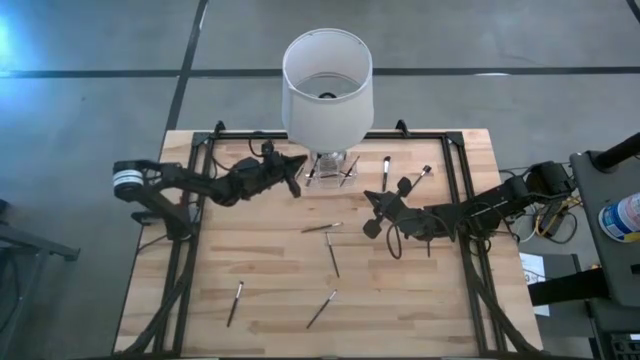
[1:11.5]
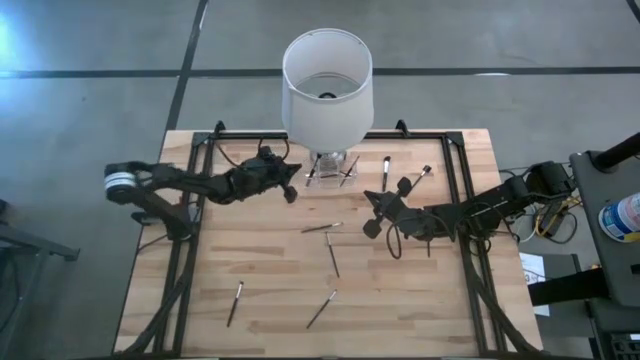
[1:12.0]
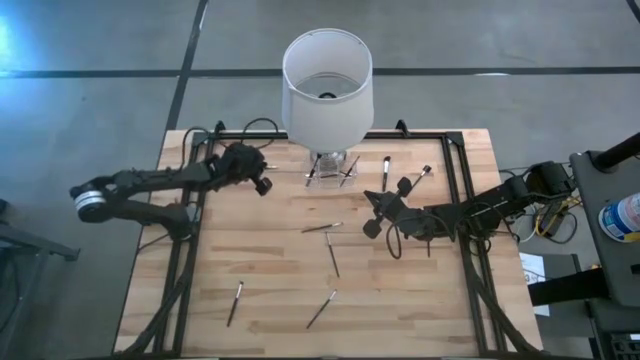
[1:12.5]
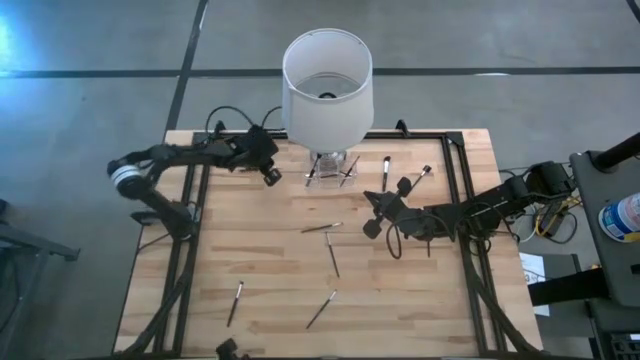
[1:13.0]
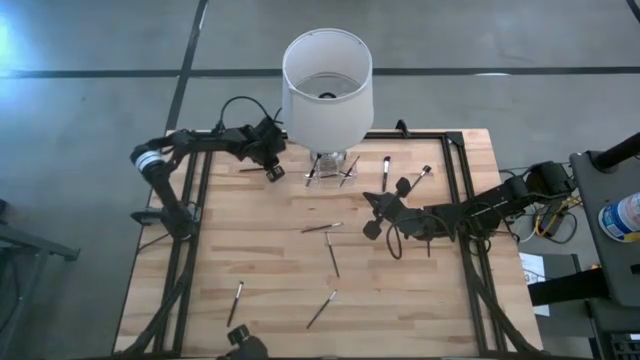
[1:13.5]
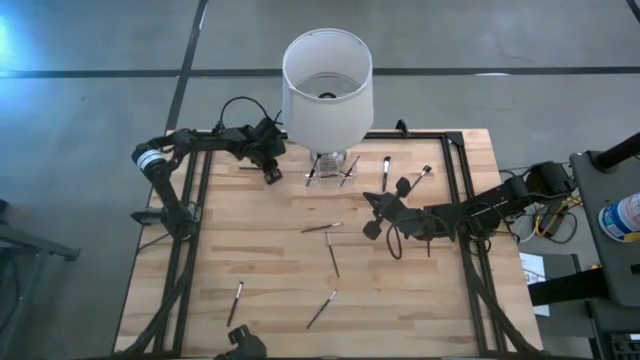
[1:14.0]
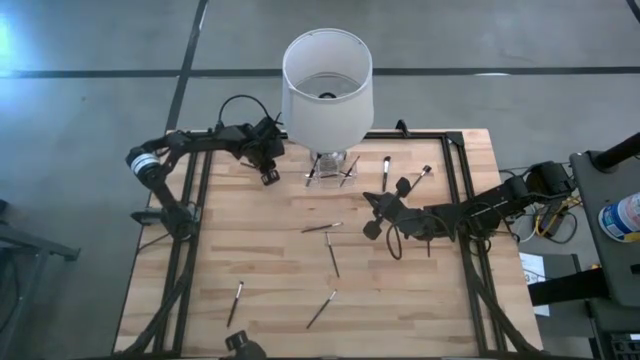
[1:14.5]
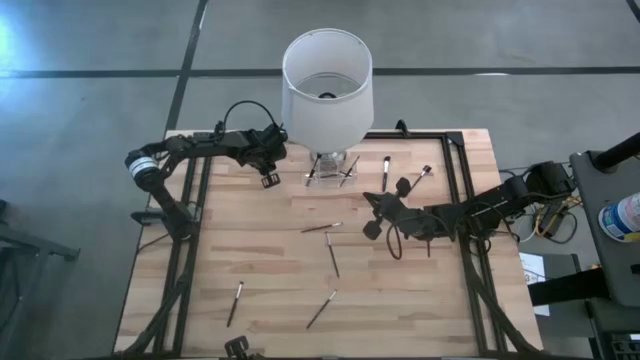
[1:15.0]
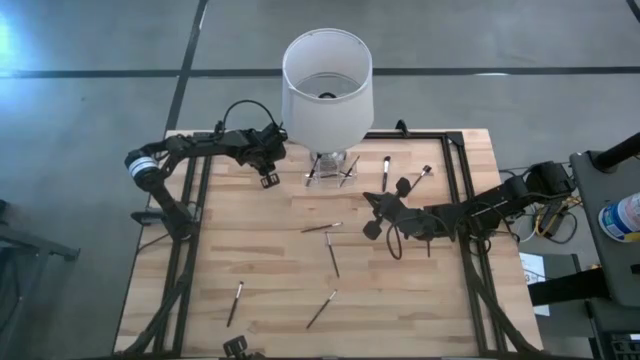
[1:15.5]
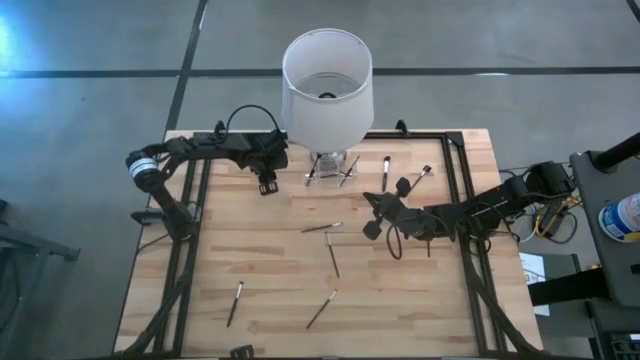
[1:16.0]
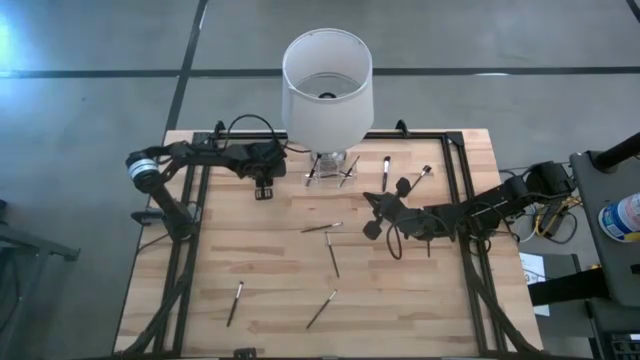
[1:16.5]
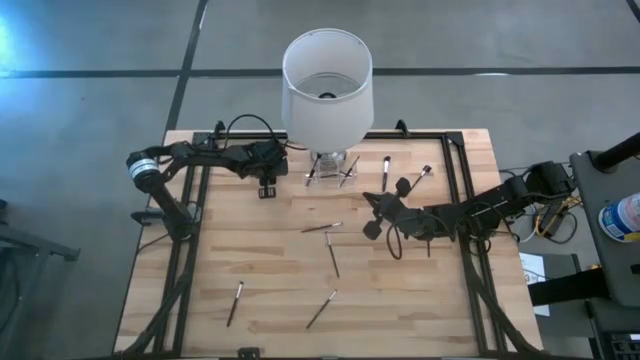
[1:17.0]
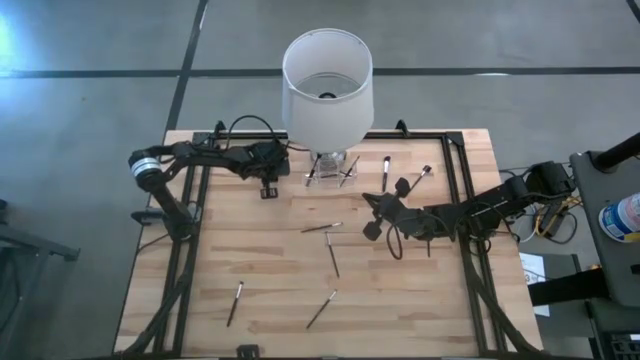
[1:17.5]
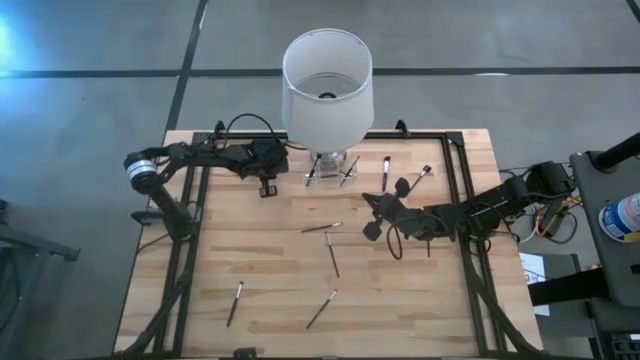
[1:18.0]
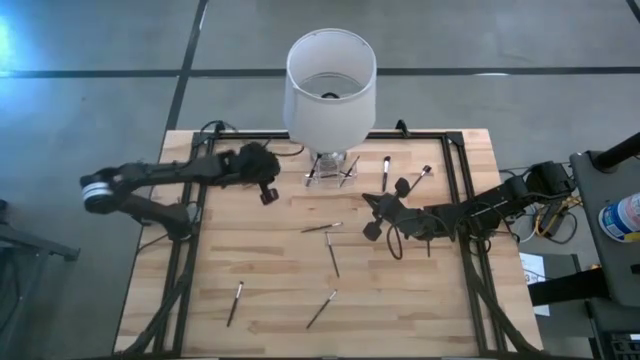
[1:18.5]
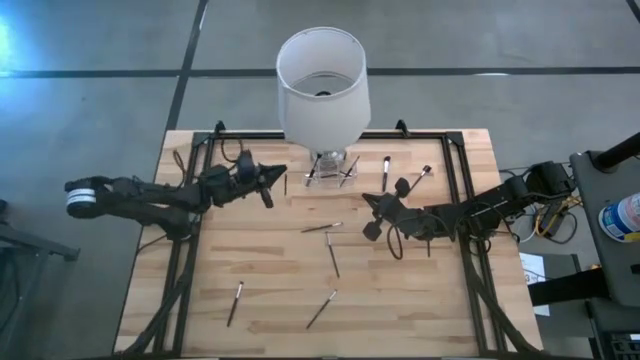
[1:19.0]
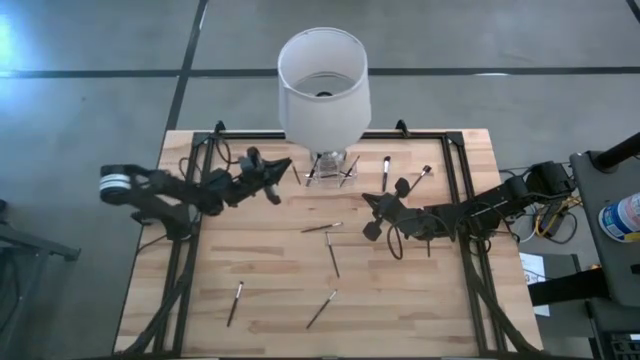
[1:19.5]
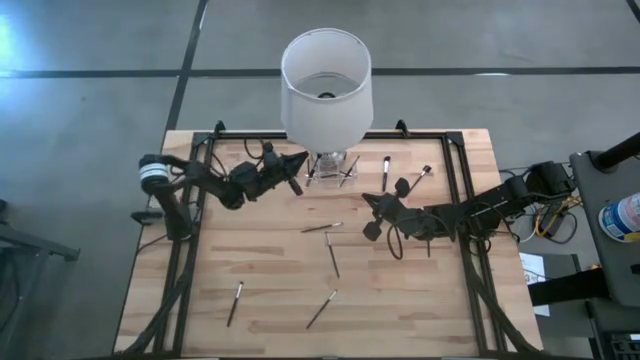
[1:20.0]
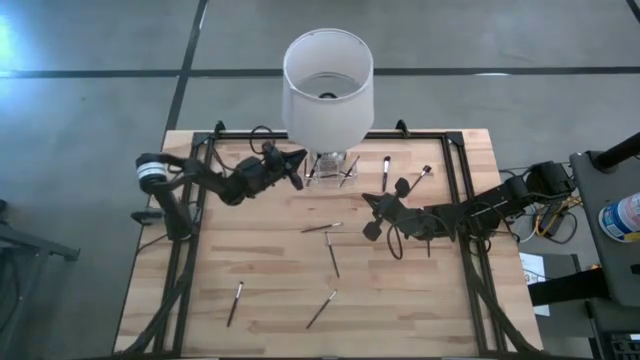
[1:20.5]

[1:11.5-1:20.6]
Task: Put items in baskets/containers
Put the black eyeshadow brush into the transparent organizer

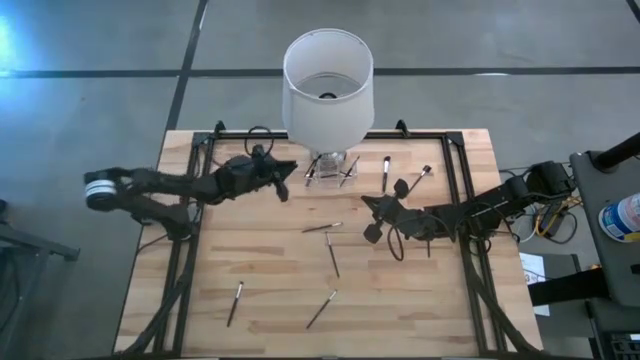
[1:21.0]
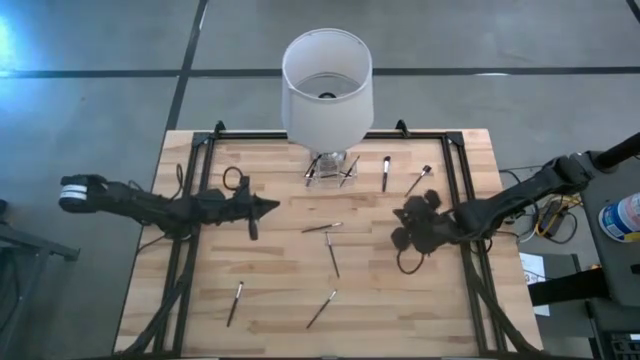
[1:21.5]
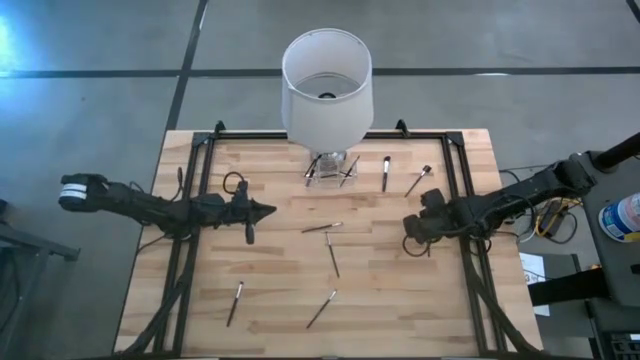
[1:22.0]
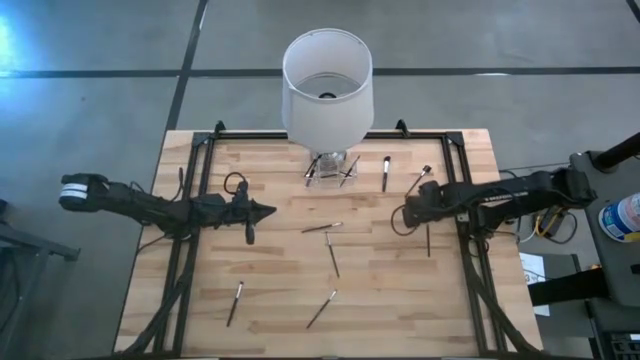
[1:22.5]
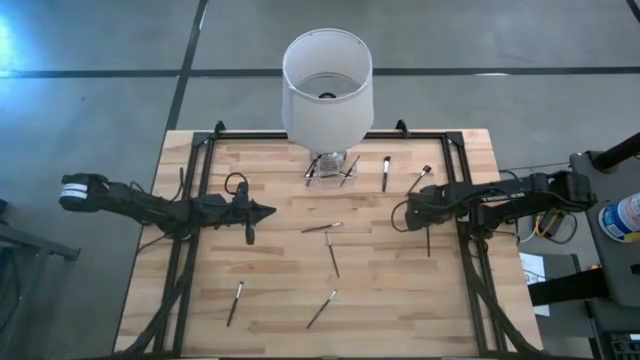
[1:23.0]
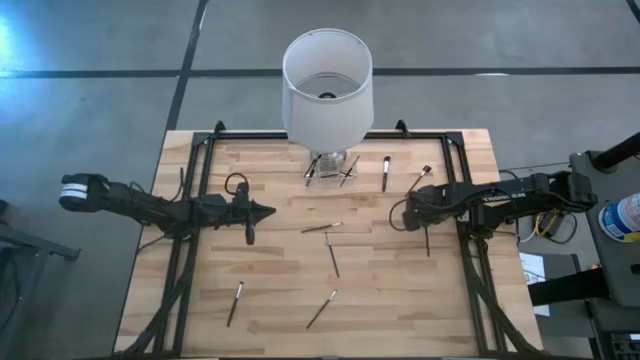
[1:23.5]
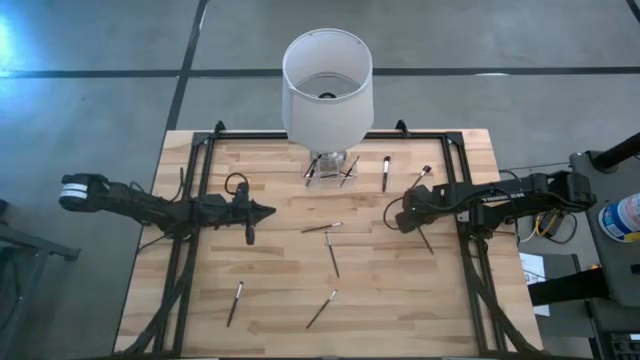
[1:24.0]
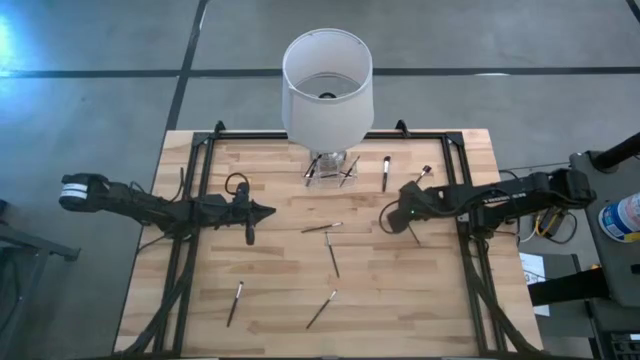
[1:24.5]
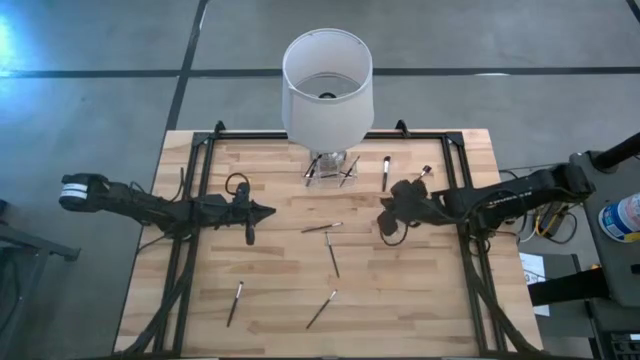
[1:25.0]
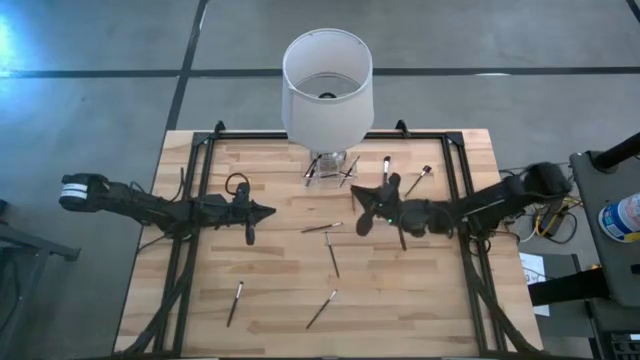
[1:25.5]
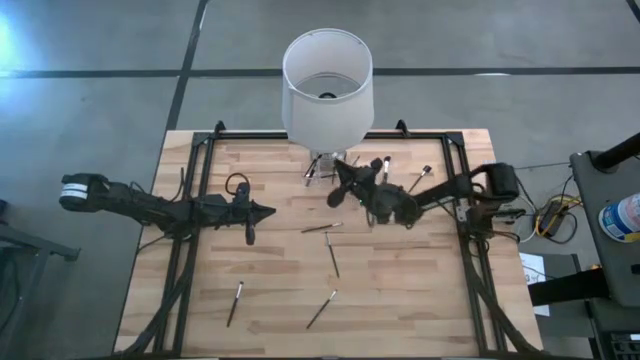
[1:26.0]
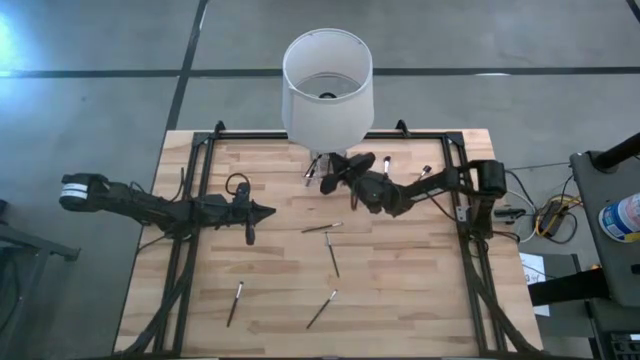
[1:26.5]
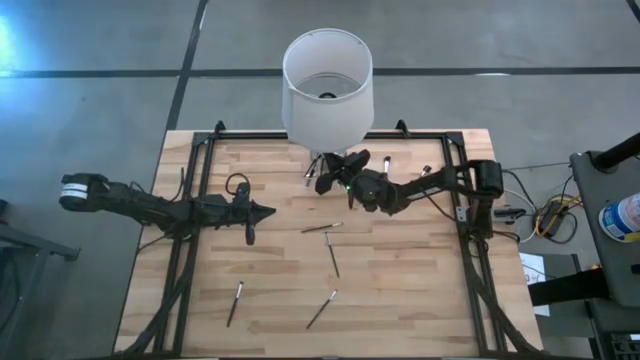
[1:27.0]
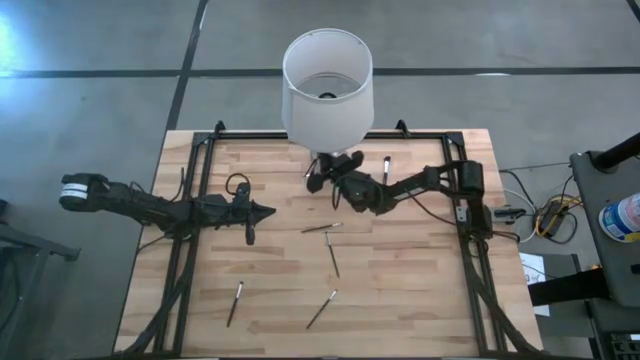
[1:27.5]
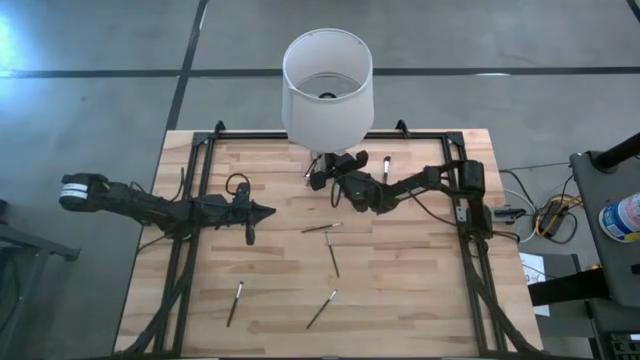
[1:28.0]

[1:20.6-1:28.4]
Put the black eyeshadow brush into the transparent organizer

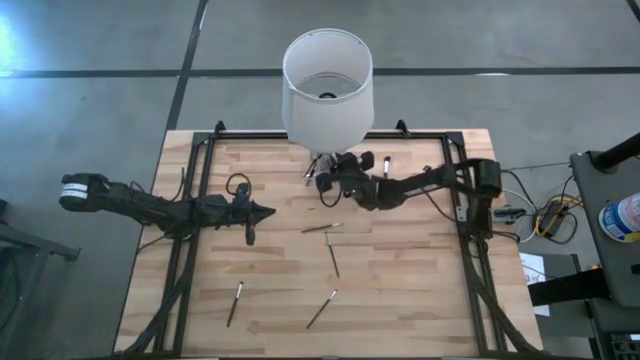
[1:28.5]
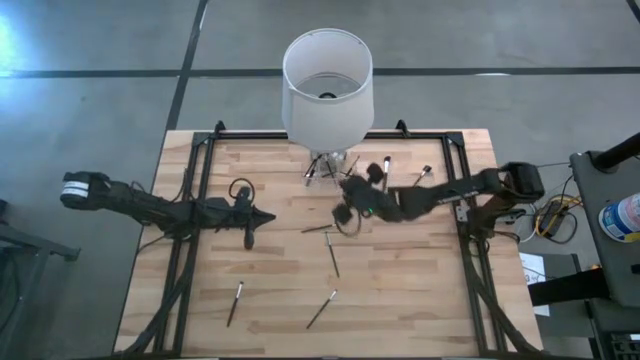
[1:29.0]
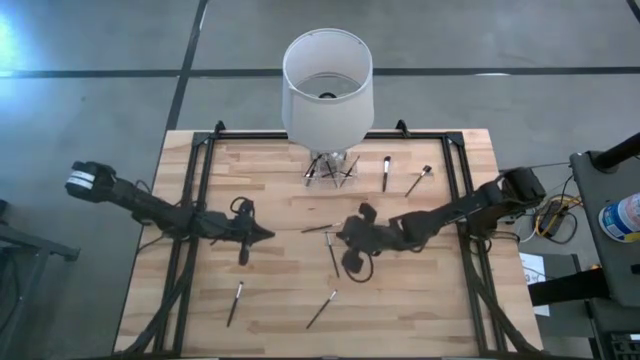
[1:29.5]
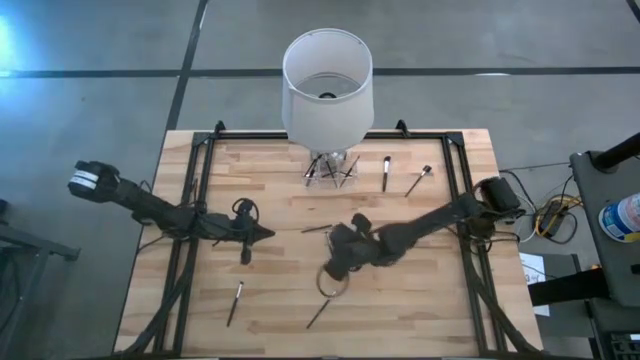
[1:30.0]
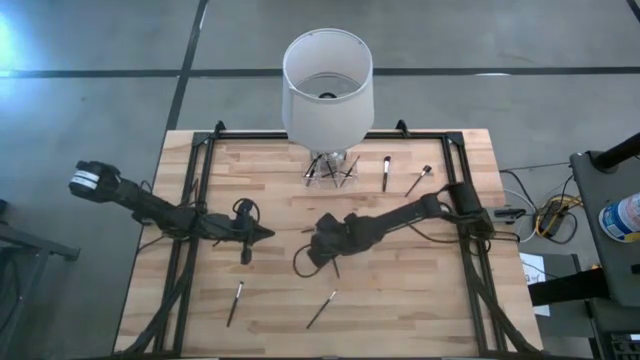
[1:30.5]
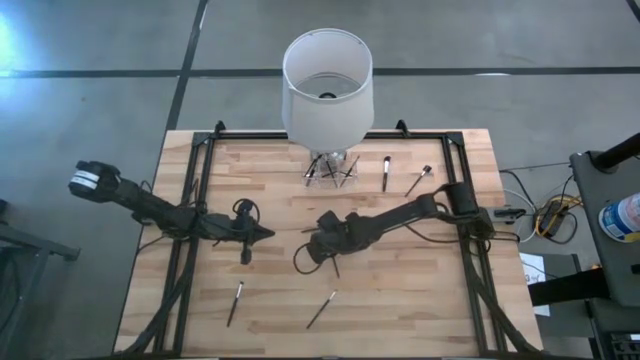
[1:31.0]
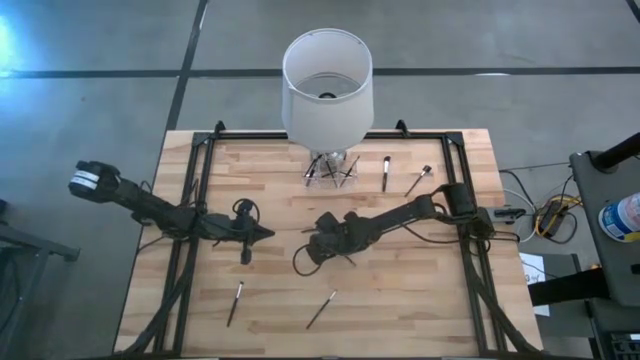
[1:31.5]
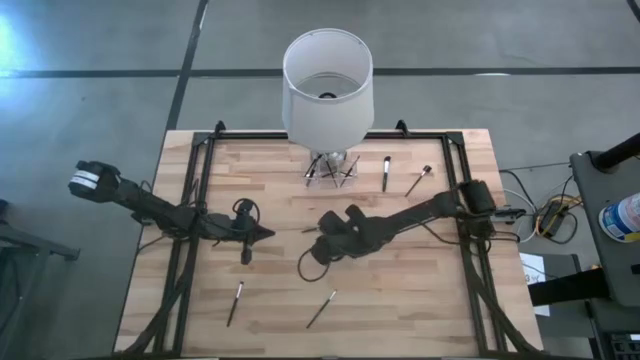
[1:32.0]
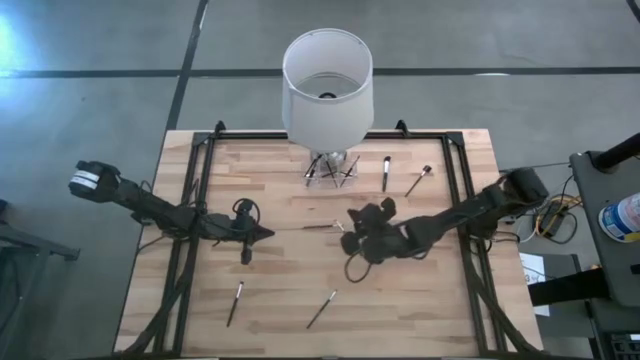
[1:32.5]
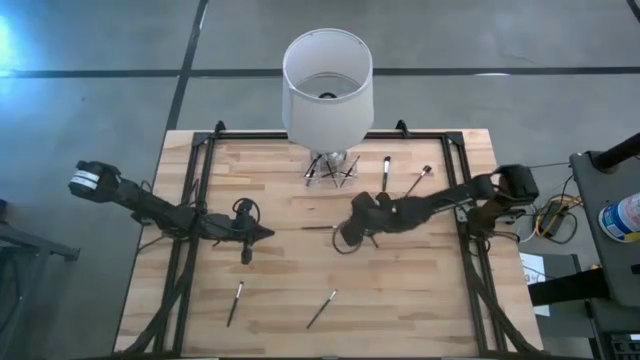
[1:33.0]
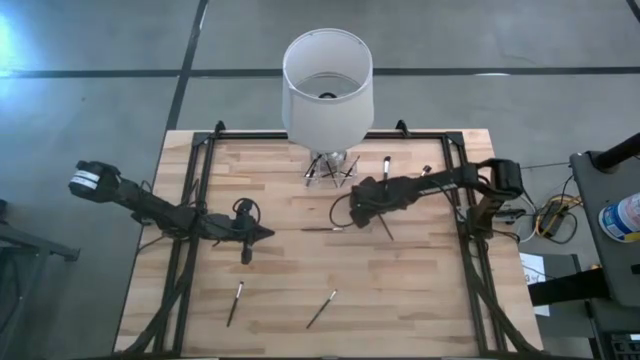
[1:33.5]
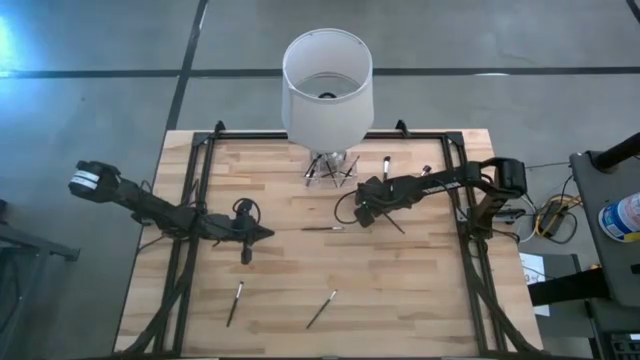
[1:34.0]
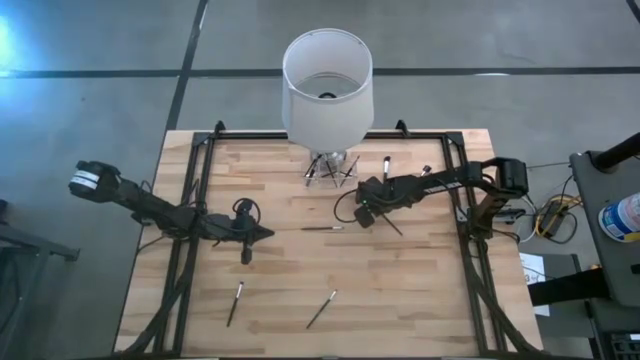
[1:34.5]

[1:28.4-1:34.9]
Put the black eyeshadow brush into the transparent organizer
